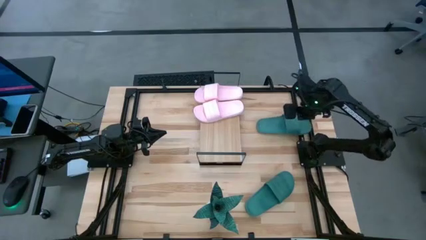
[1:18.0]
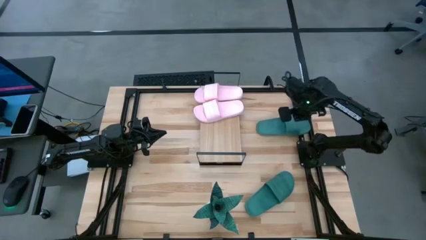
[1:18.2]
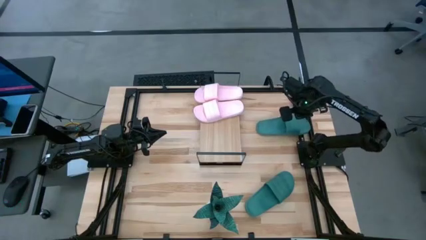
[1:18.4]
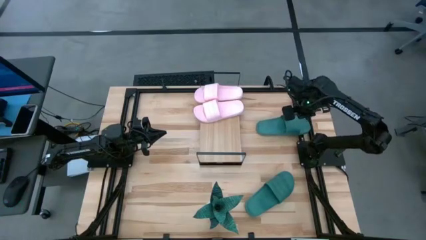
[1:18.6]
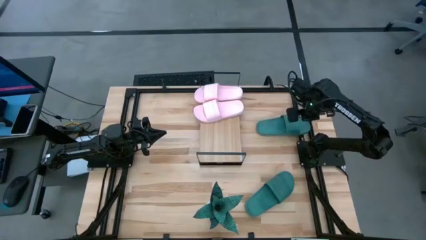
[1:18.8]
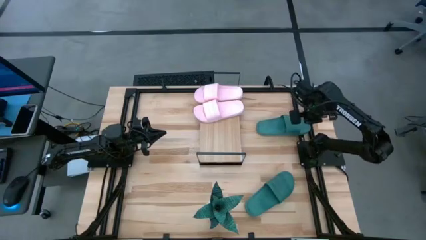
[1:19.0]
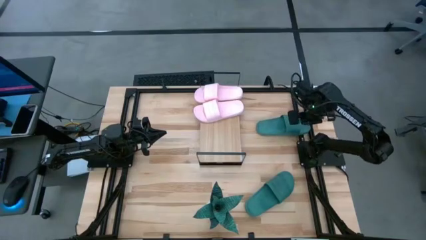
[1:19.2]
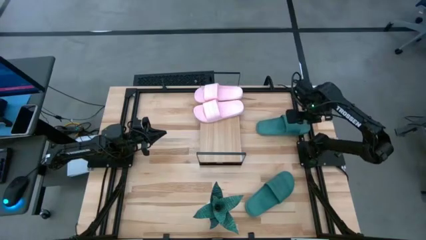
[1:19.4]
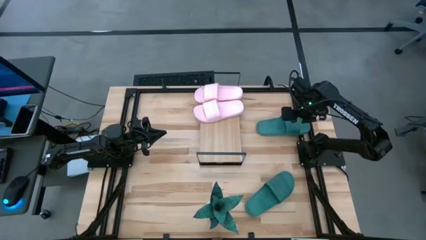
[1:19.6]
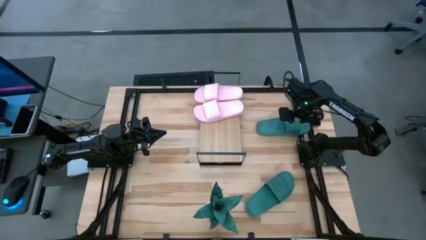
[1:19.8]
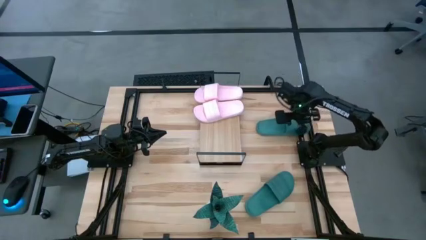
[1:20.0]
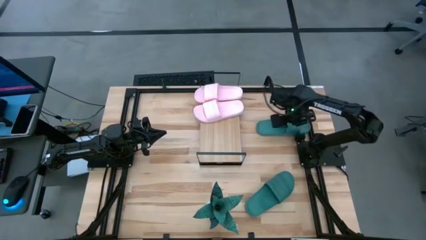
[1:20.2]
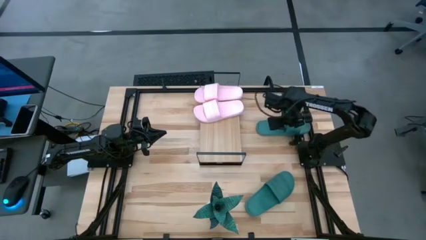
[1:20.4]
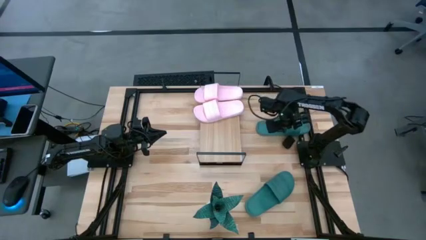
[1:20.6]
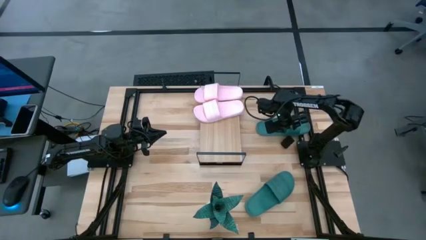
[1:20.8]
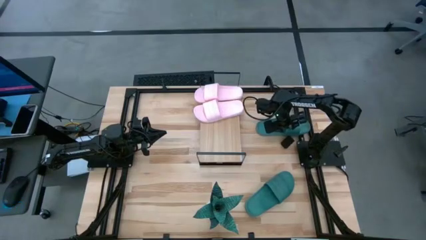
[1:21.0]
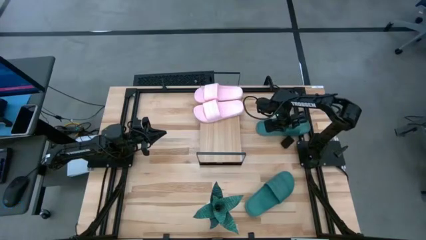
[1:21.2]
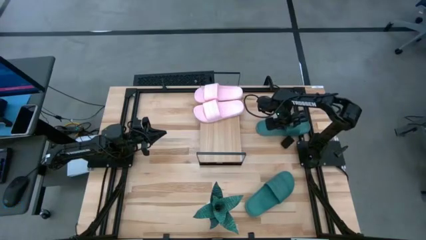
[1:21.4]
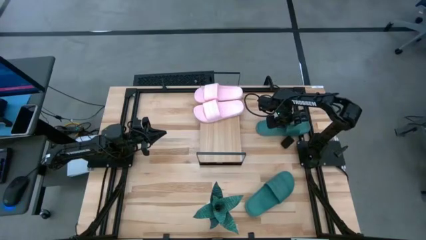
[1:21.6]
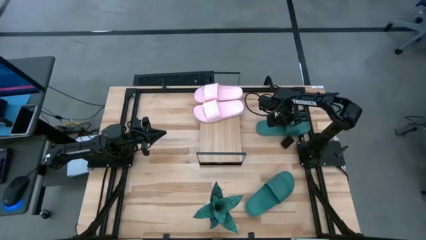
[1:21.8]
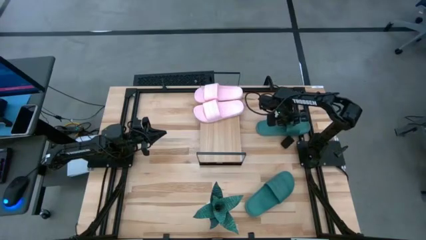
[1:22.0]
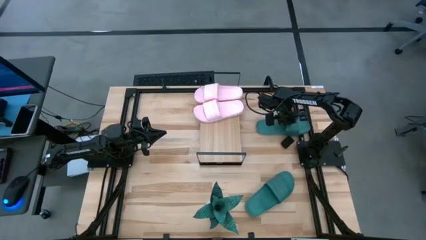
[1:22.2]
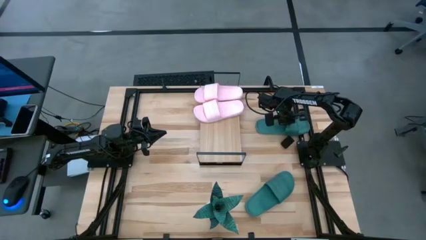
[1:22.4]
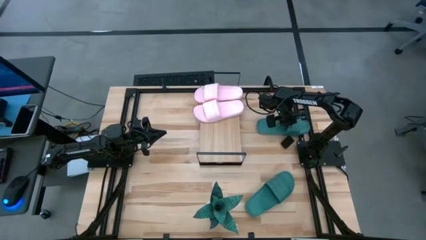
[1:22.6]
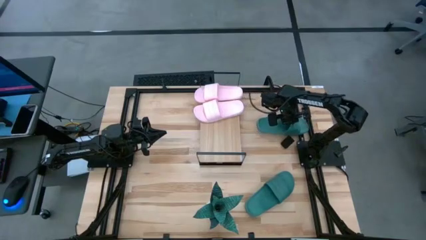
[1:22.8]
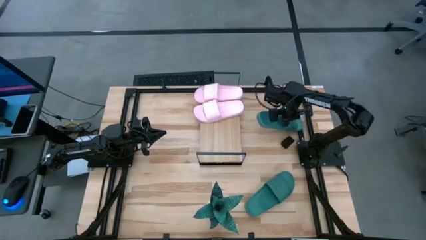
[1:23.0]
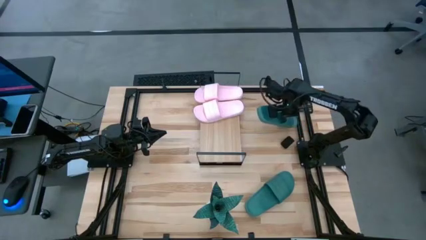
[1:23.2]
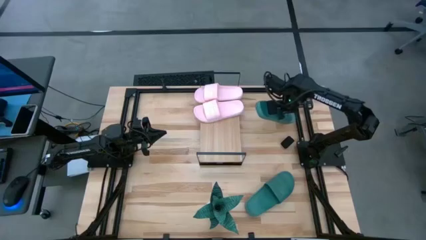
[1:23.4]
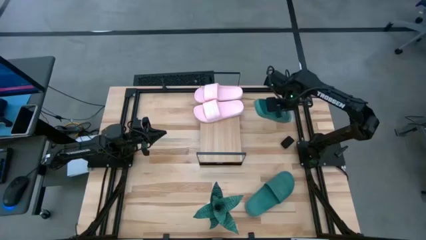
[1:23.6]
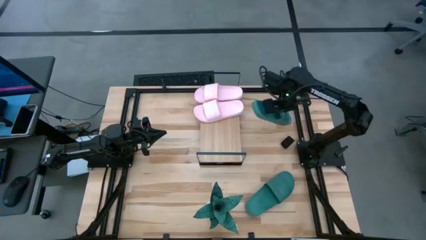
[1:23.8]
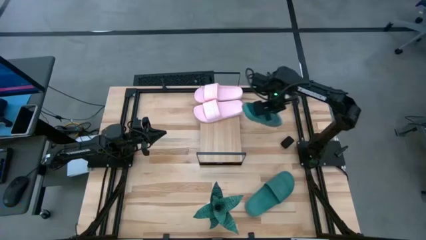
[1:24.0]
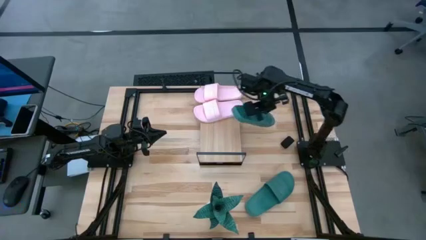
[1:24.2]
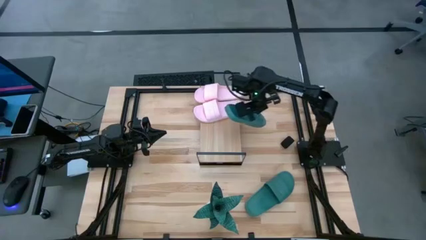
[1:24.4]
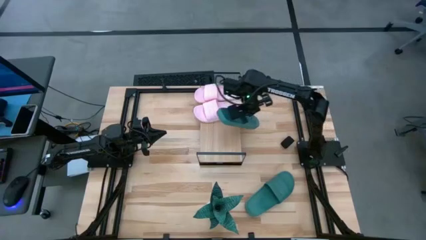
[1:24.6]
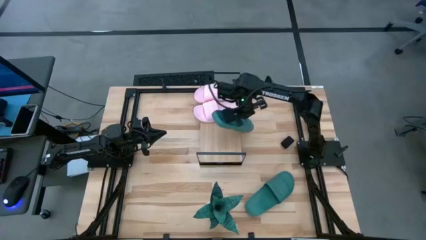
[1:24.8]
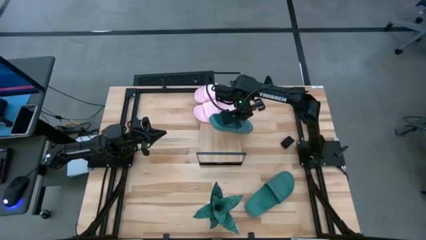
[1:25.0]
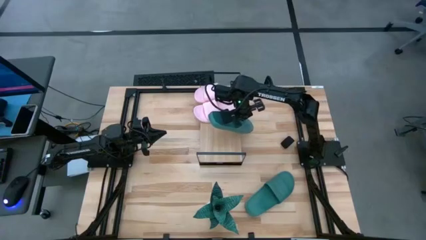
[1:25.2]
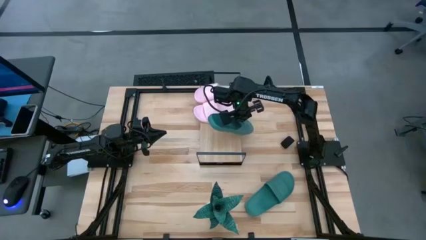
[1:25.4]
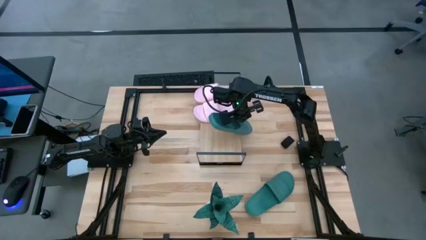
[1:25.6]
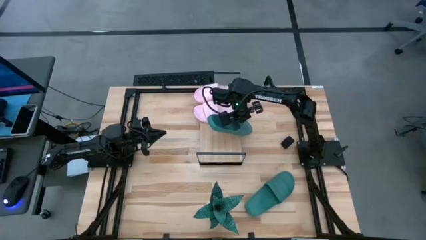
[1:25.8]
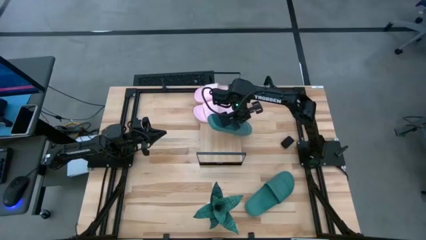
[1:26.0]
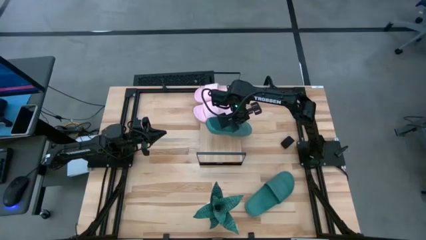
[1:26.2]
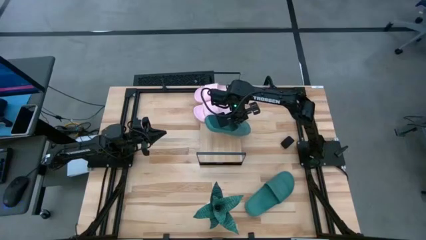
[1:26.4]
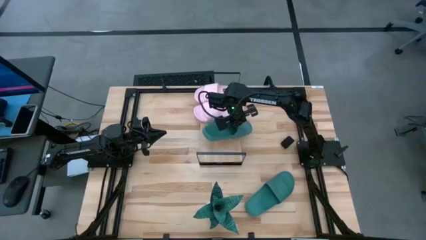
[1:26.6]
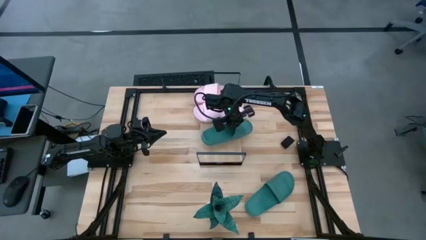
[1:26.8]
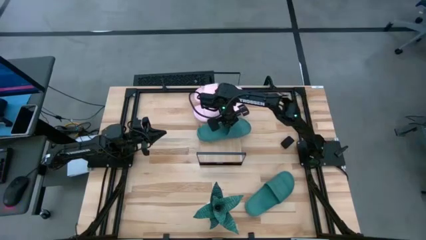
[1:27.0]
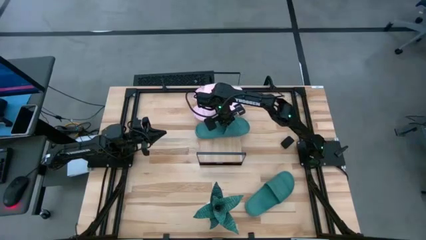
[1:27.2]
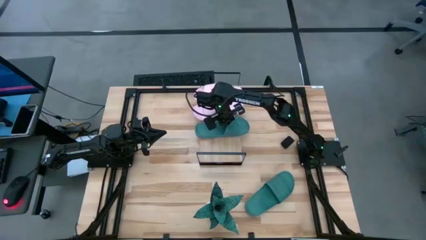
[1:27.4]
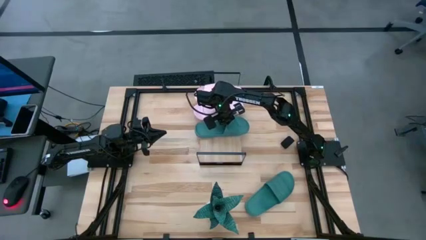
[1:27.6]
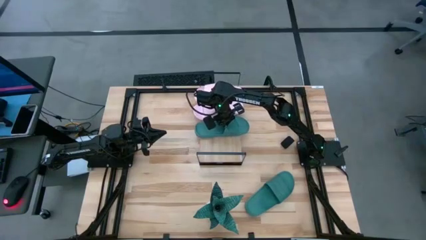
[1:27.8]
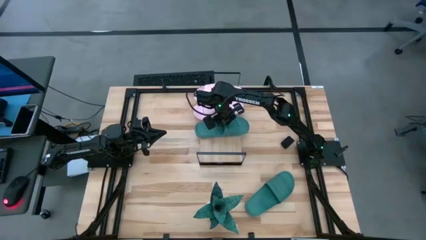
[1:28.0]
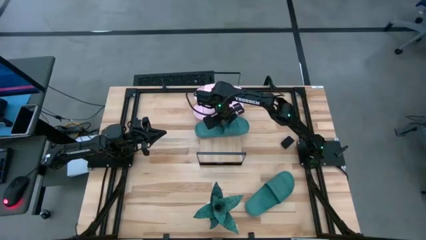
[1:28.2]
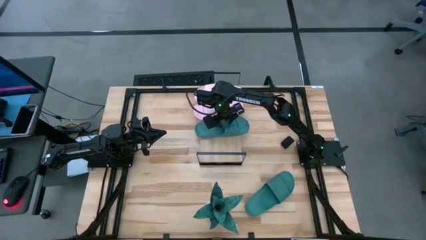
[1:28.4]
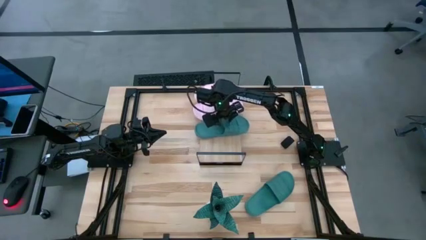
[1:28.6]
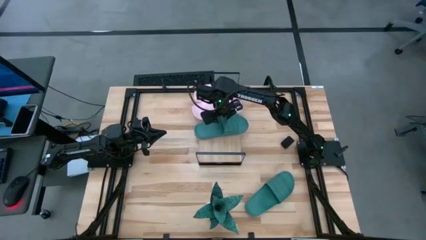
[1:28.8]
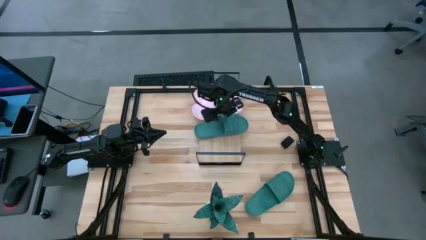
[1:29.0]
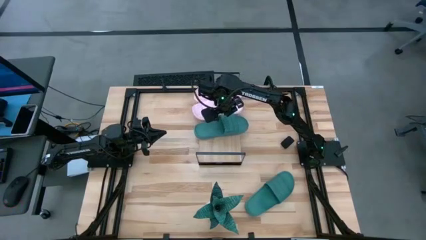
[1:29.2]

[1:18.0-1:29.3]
Task: Pick and place slides into the shelf
Put the top green slipper on the shelf

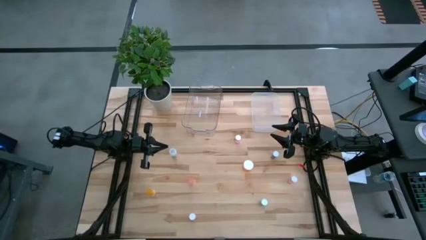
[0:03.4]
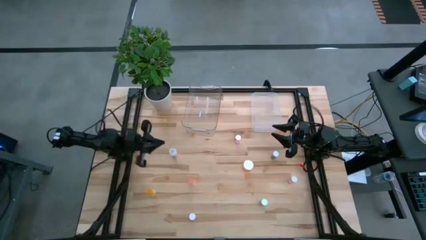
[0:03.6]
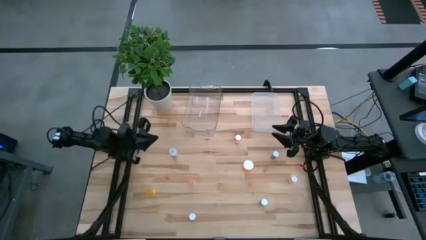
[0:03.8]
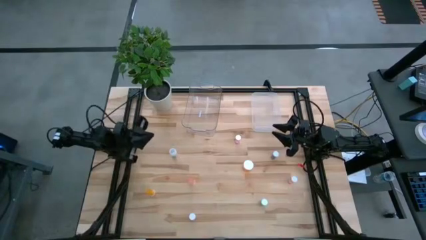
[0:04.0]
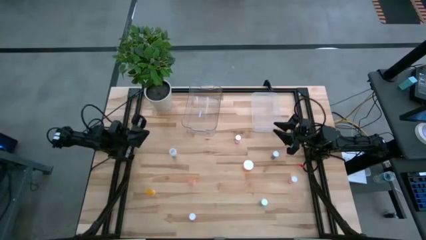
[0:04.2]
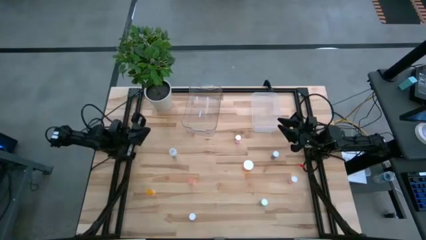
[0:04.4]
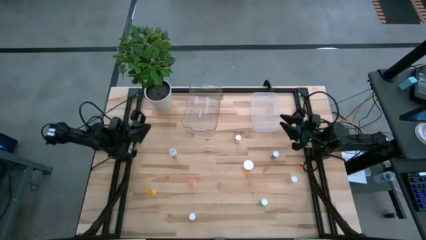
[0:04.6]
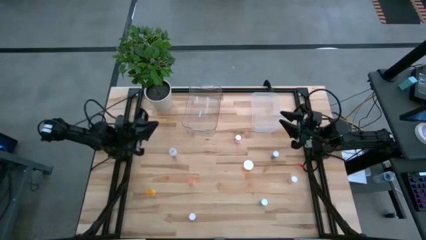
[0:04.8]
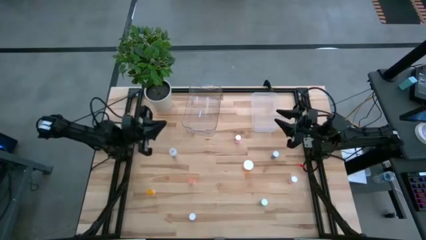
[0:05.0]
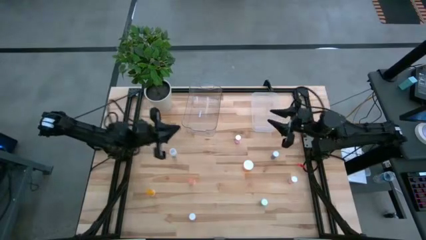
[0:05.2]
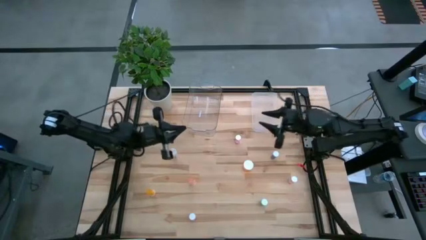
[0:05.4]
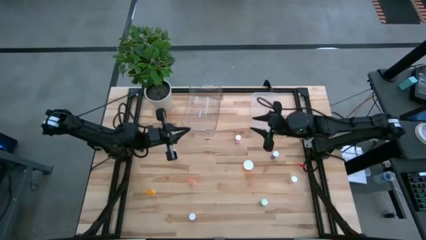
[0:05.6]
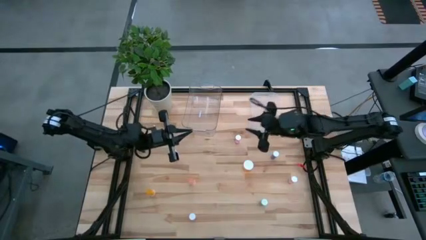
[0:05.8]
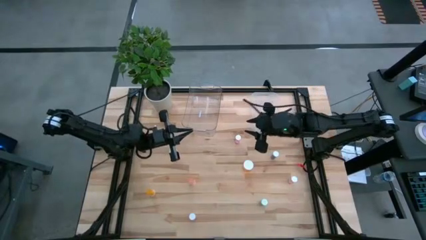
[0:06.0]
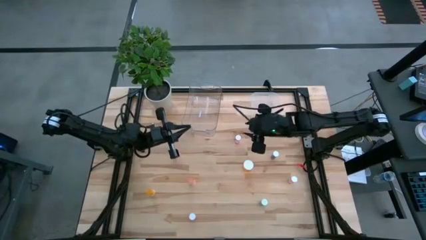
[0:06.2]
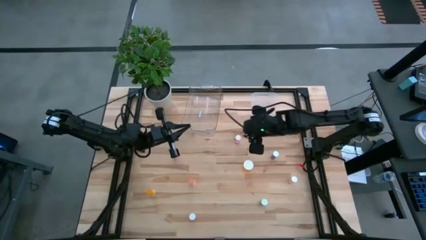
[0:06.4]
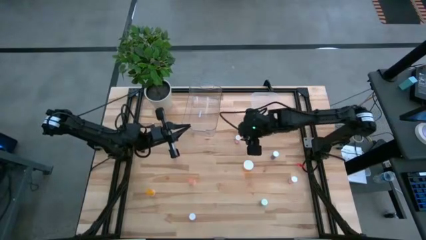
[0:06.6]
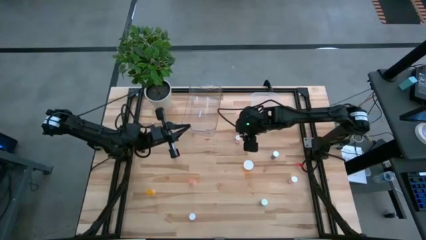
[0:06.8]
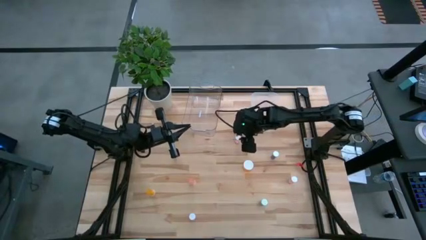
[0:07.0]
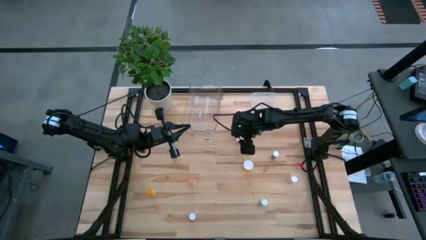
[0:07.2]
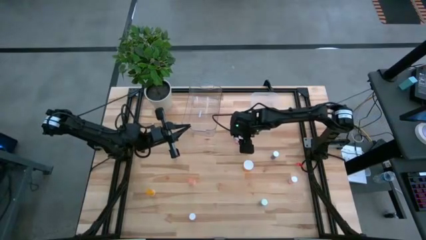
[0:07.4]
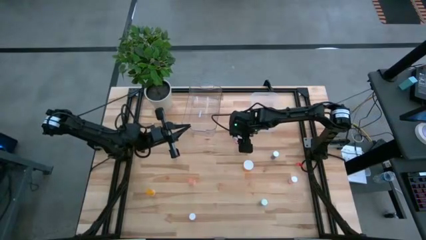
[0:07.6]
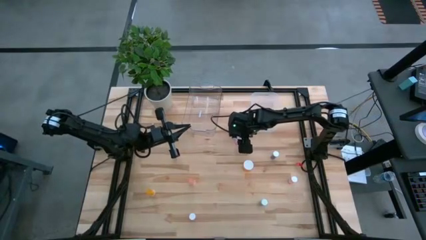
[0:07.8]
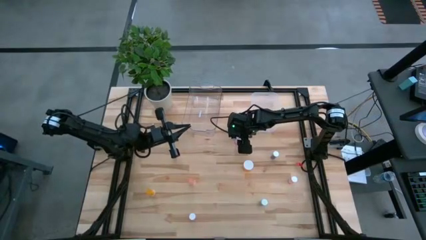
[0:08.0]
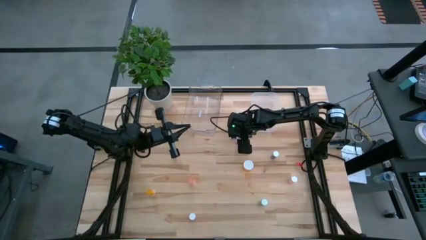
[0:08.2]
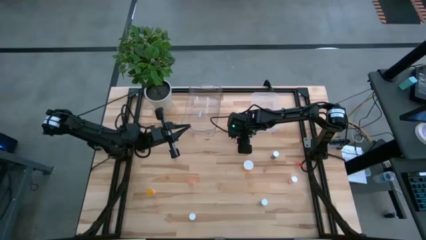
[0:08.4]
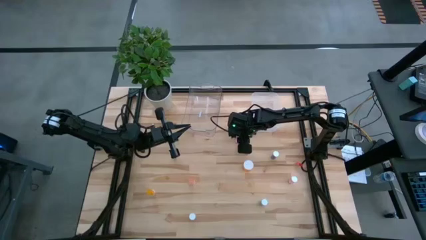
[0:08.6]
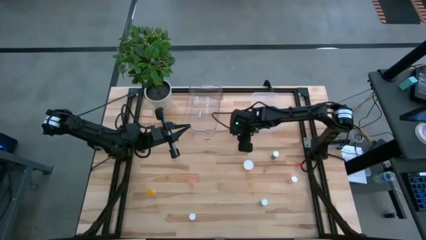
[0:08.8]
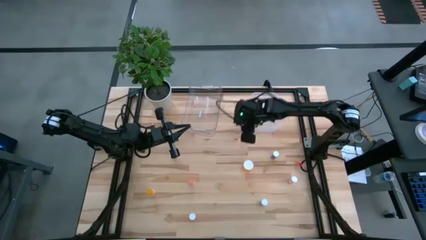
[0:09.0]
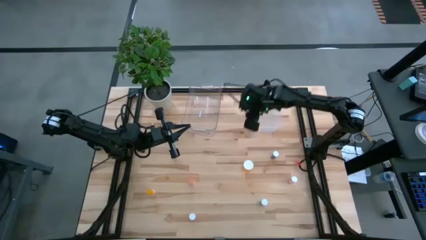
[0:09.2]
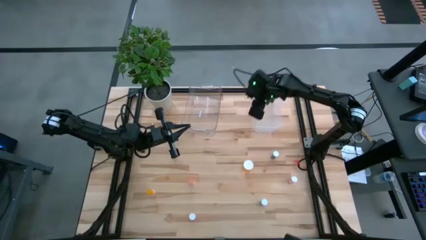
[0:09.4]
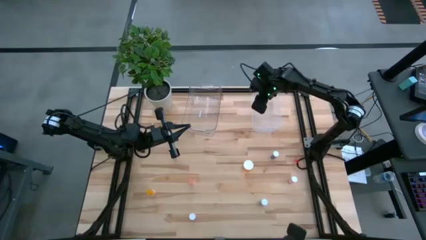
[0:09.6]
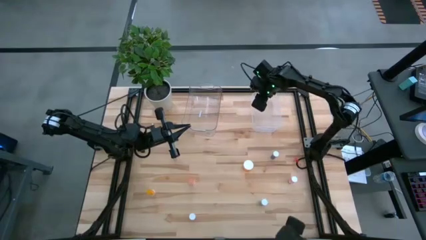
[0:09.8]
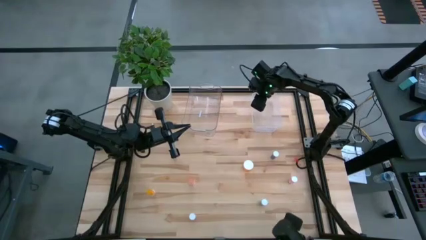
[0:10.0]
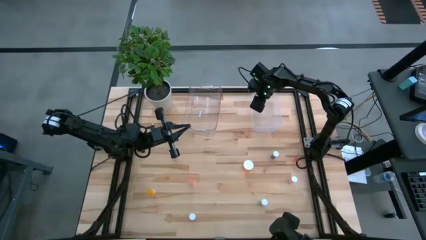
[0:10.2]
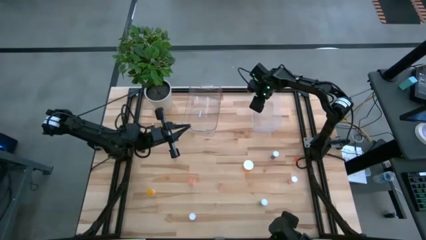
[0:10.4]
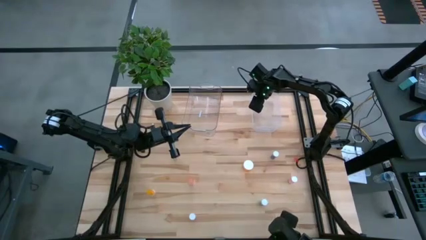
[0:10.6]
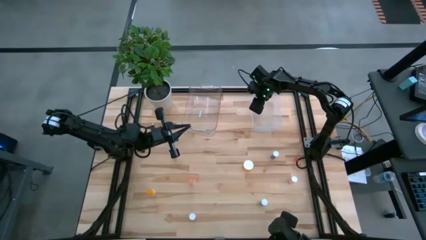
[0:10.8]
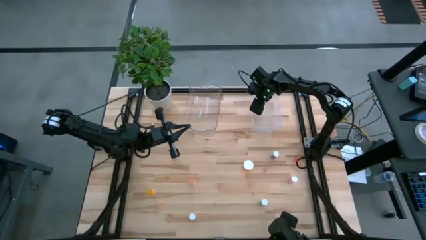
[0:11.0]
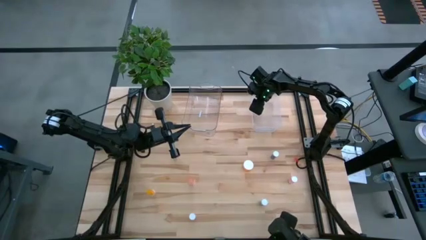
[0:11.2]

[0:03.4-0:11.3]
Task: Pick and place medicine bottles into bin by pill shape (circle, oval)
Put the pink tablet pill bottle into the right transparent bin
